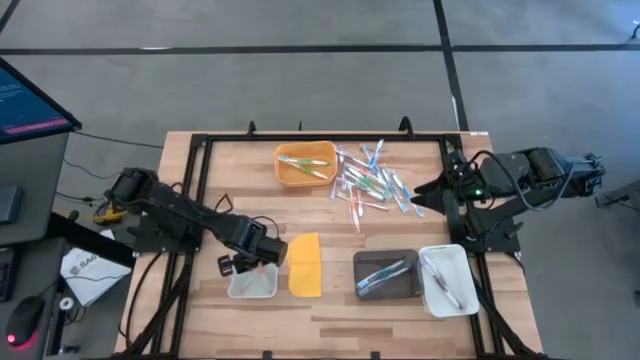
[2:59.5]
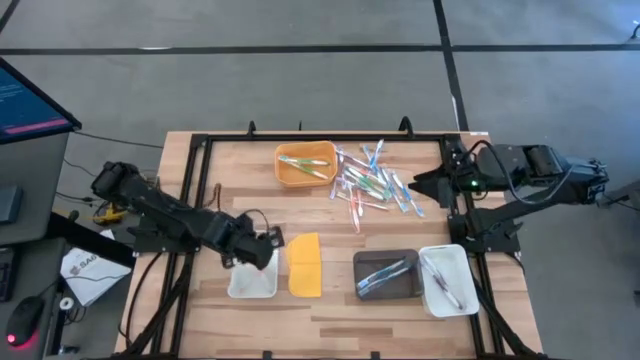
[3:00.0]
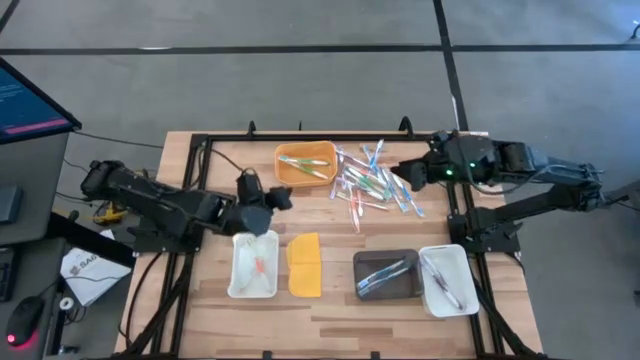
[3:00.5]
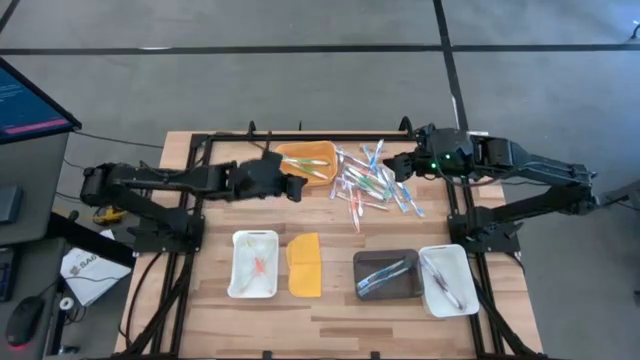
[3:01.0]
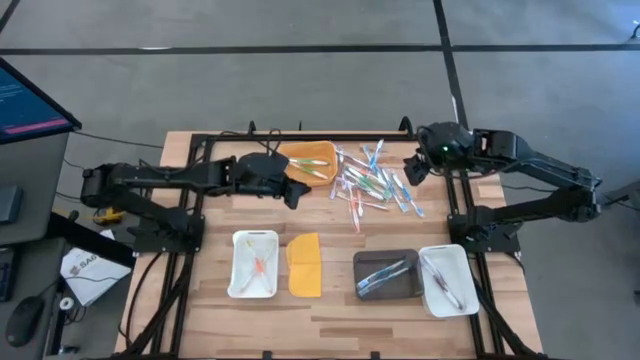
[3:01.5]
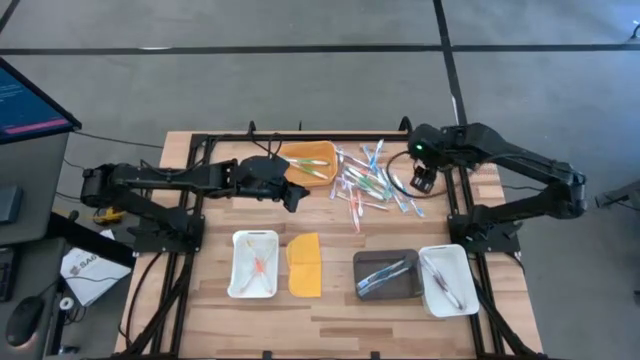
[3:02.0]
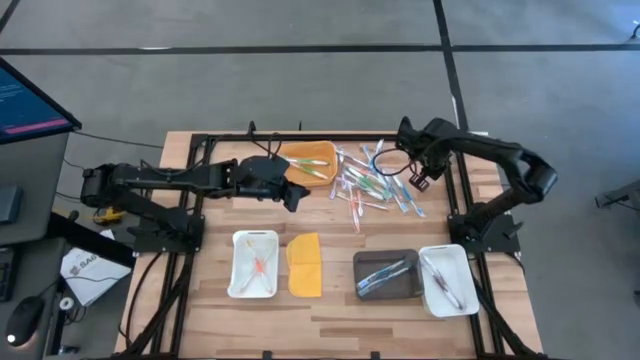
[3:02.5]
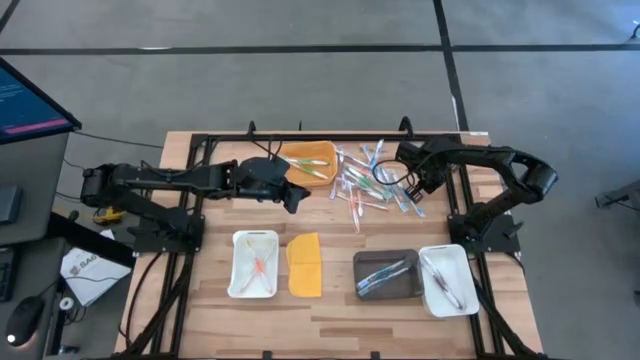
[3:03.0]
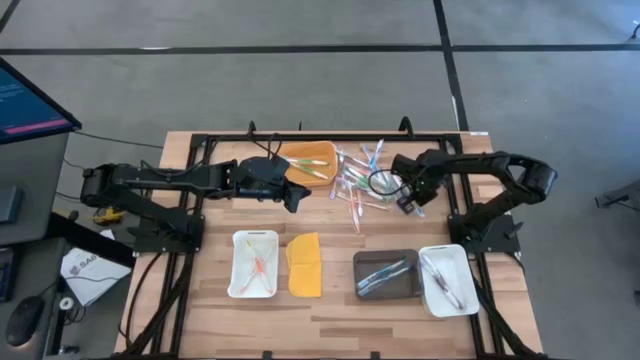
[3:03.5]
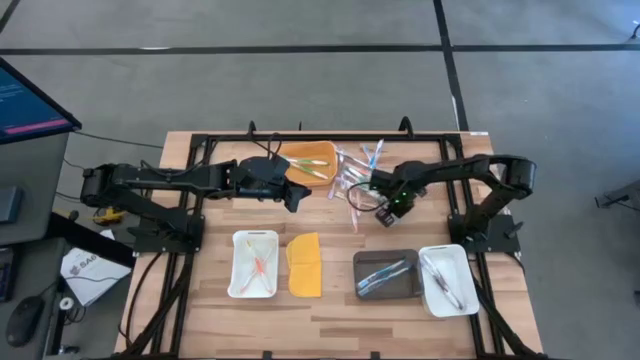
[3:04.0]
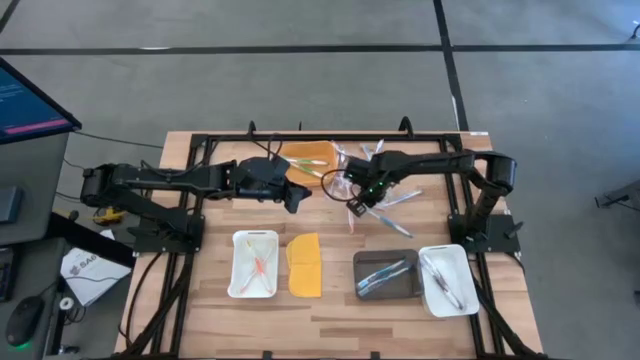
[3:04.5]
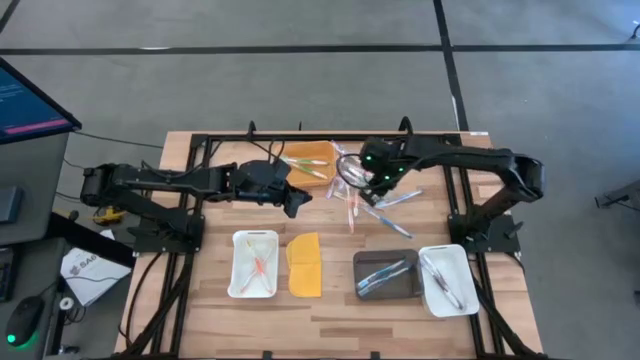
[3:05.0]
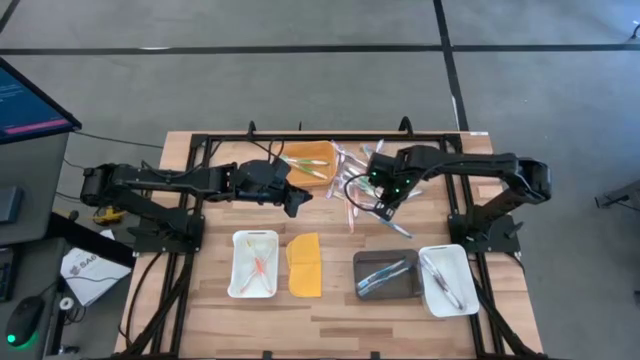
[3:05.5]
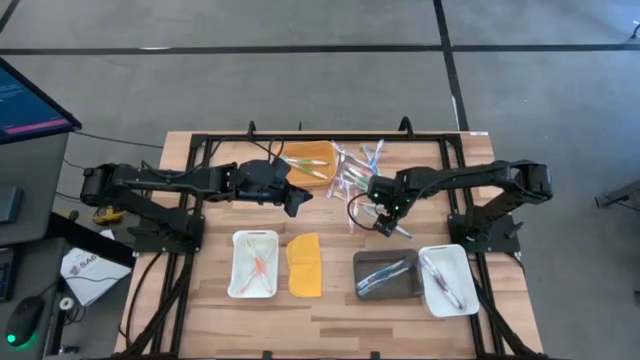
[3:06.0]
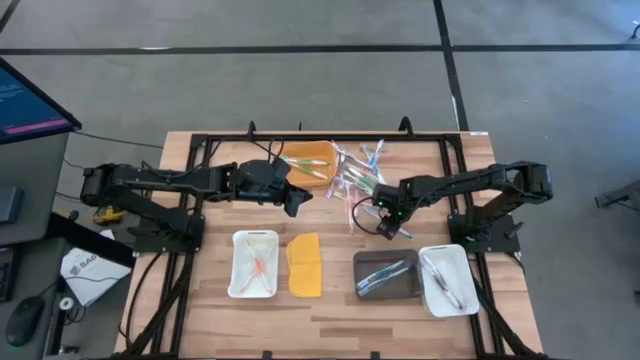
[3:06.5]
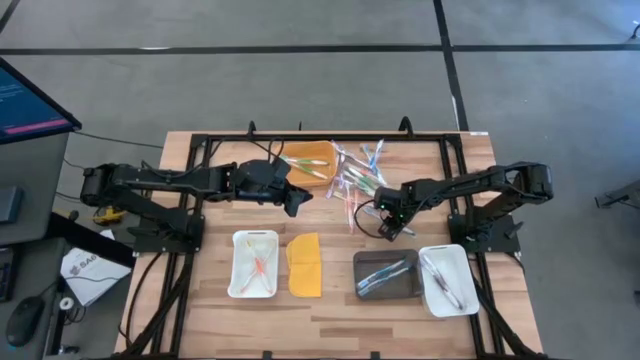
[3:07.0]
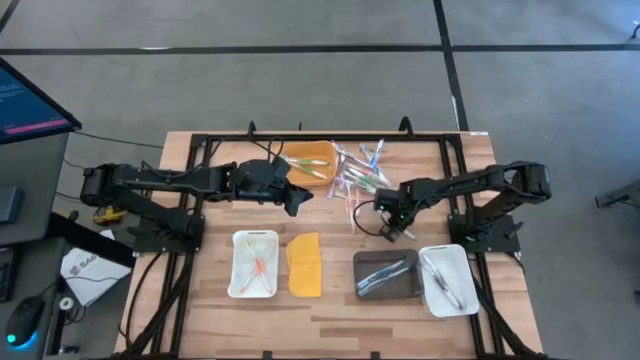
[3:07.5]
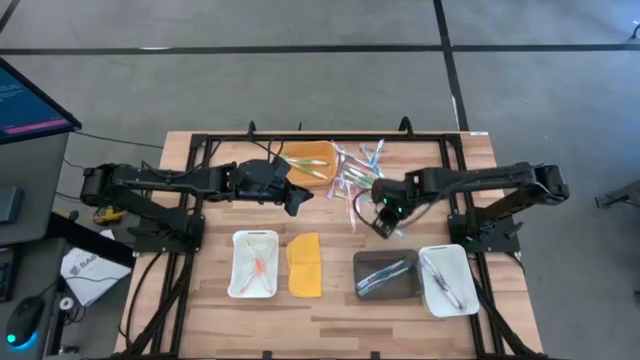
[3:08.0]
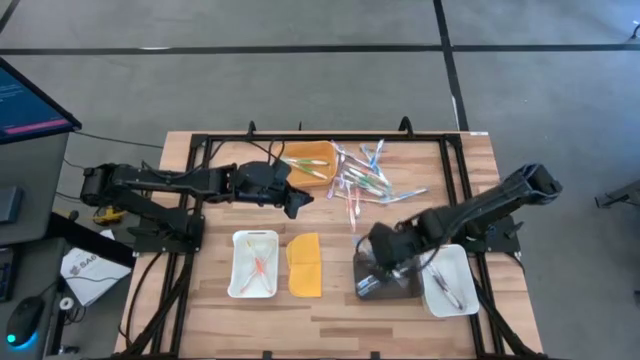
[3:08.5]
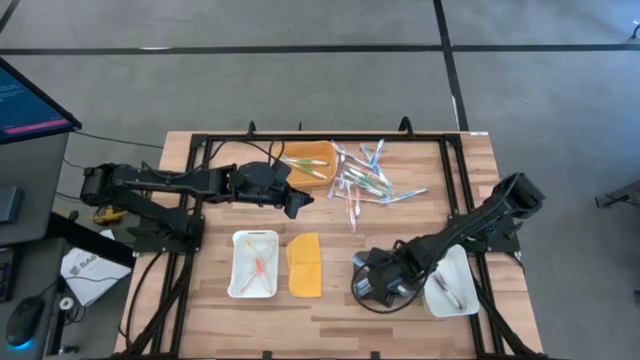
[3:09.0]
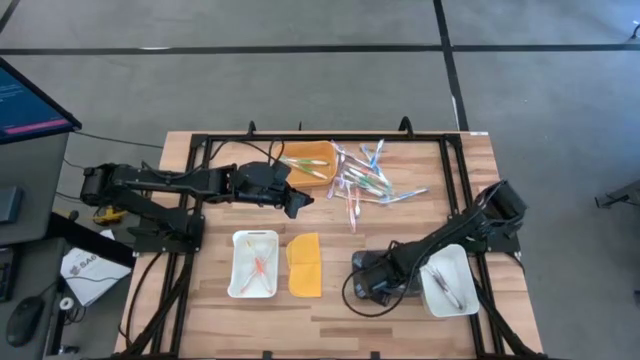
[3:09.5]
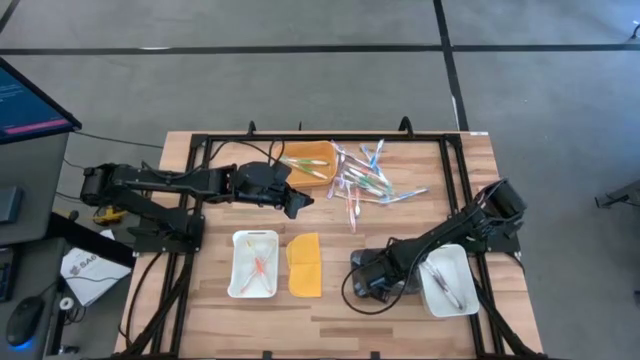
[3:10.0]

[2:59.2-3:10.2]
Task: Pick & Place Toothbrushes
Put the blue toothbrush into the black bin

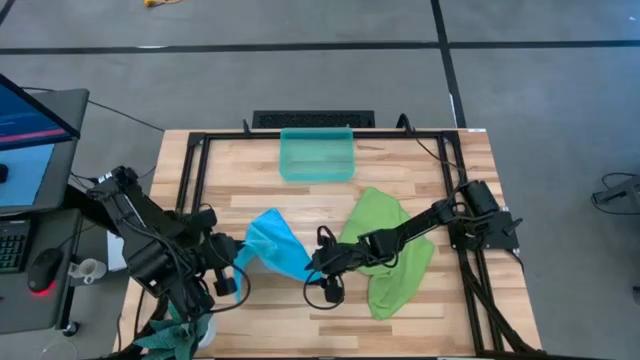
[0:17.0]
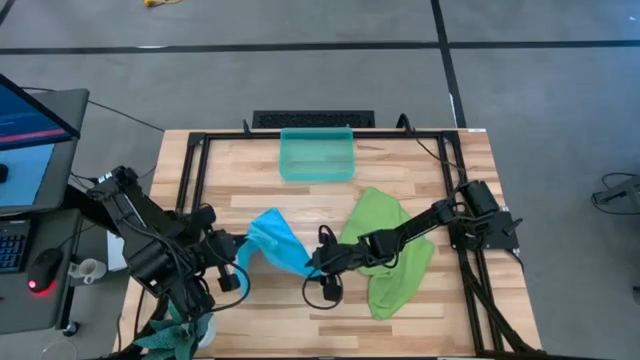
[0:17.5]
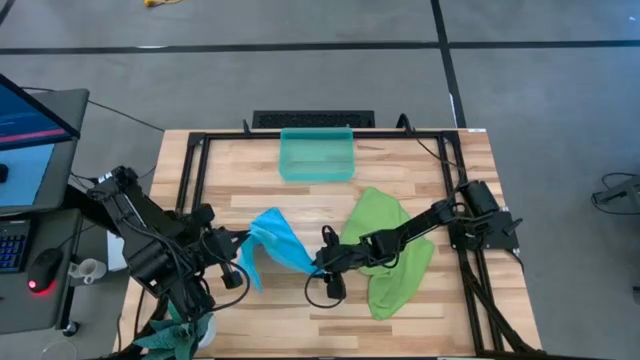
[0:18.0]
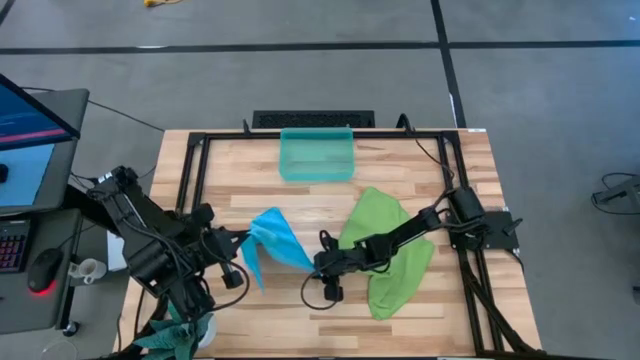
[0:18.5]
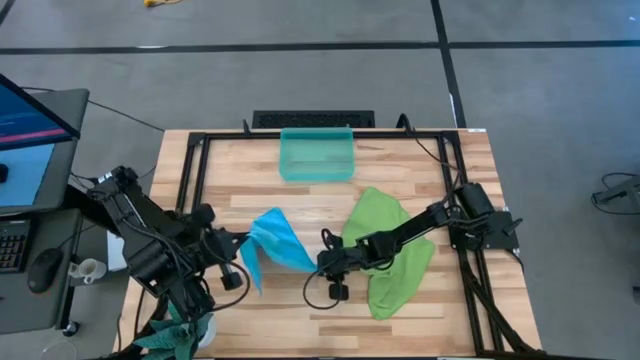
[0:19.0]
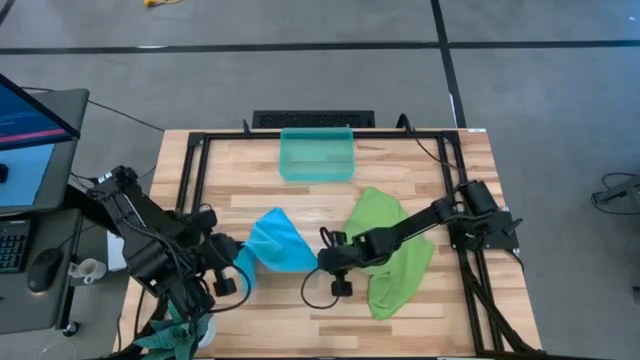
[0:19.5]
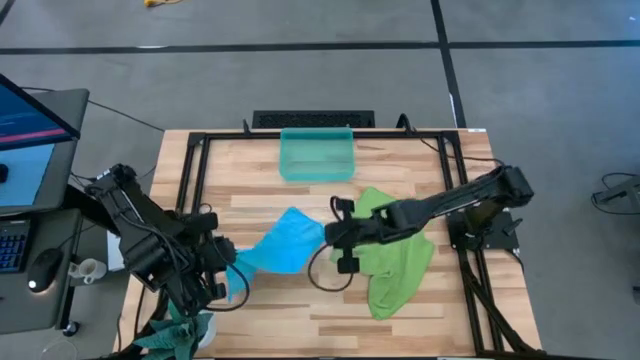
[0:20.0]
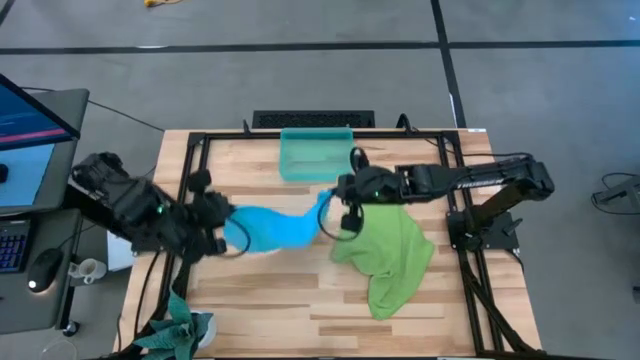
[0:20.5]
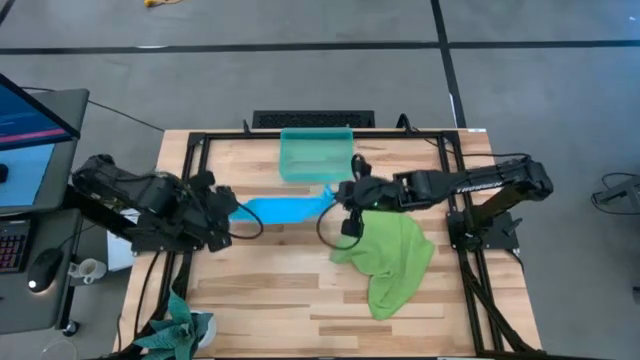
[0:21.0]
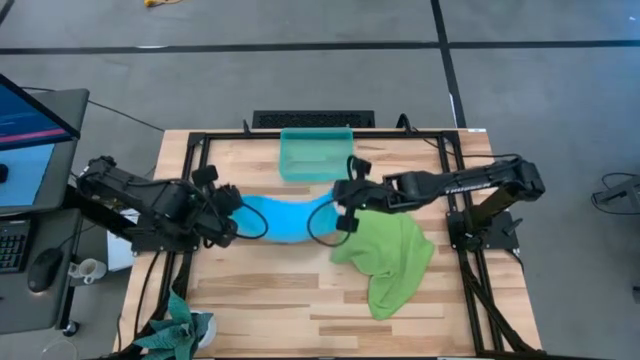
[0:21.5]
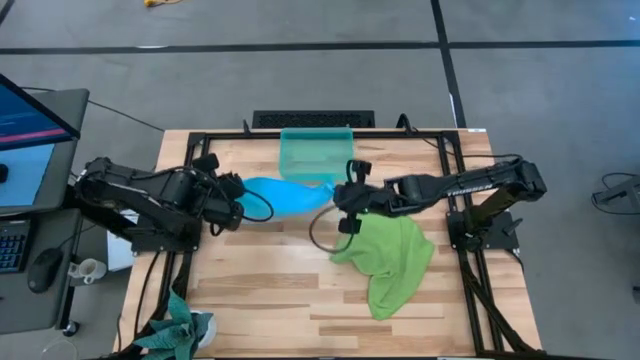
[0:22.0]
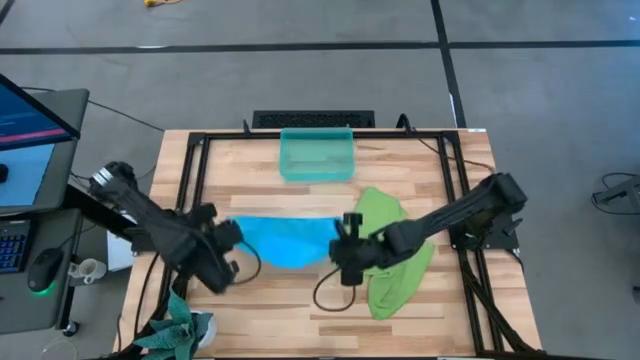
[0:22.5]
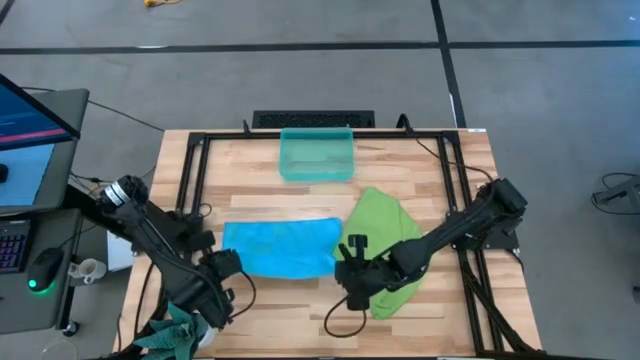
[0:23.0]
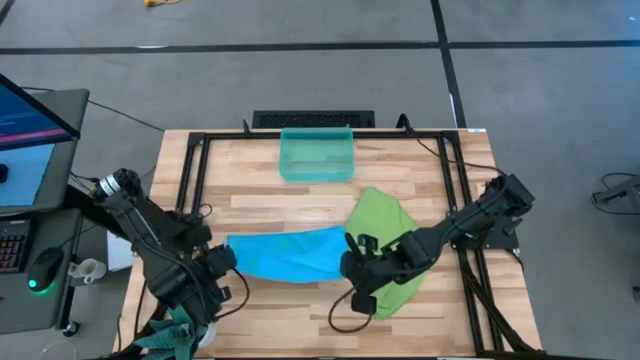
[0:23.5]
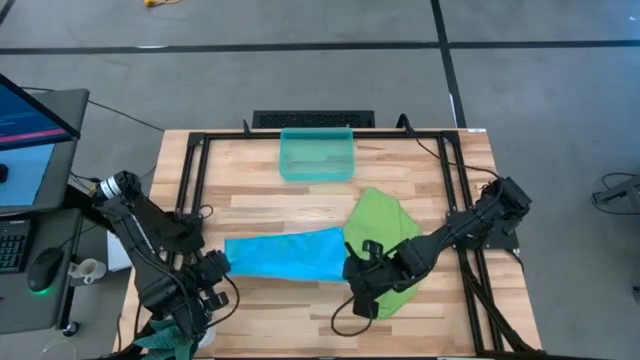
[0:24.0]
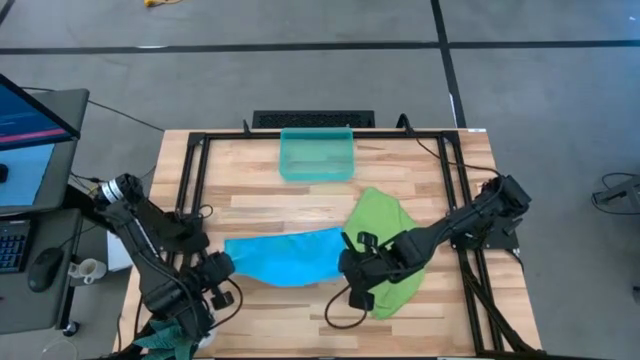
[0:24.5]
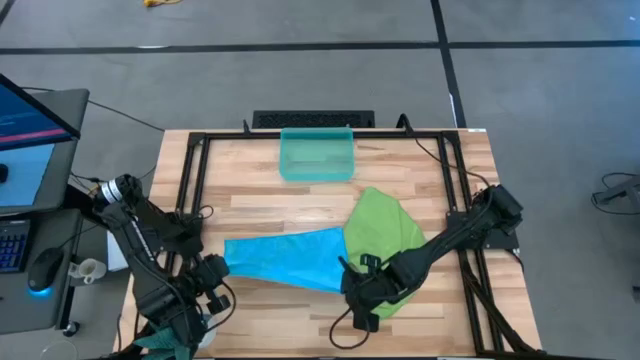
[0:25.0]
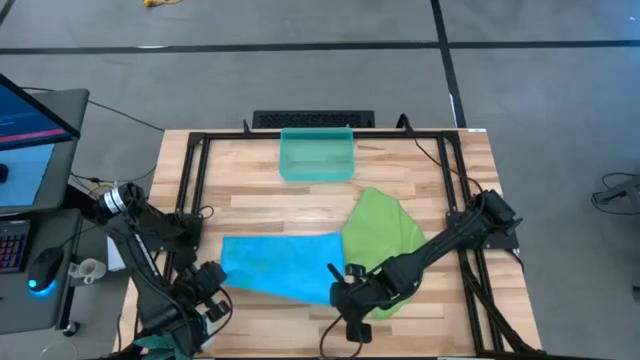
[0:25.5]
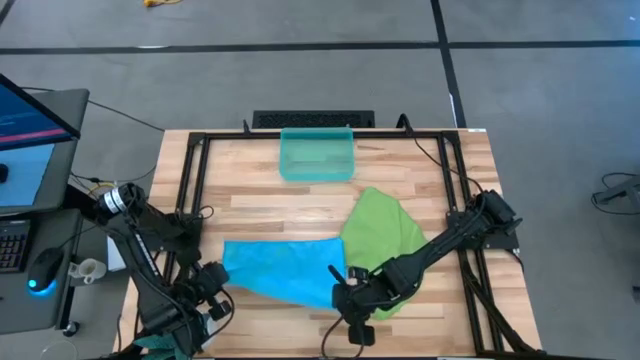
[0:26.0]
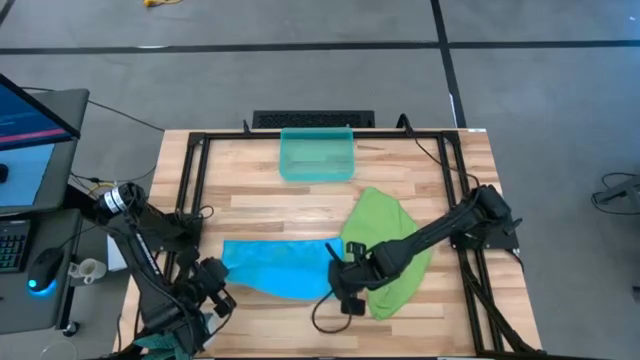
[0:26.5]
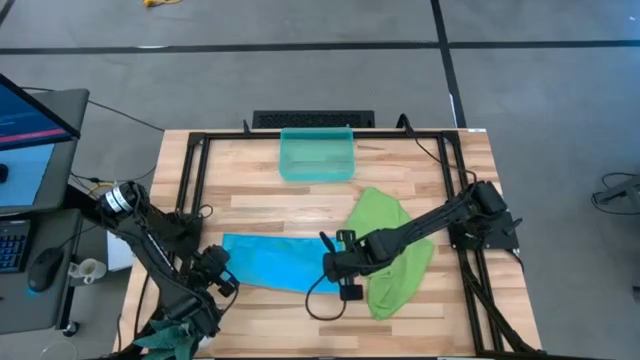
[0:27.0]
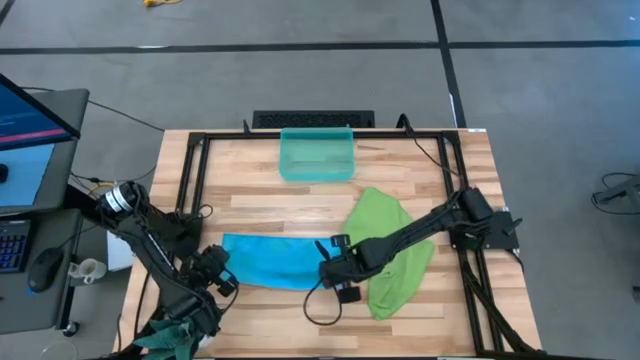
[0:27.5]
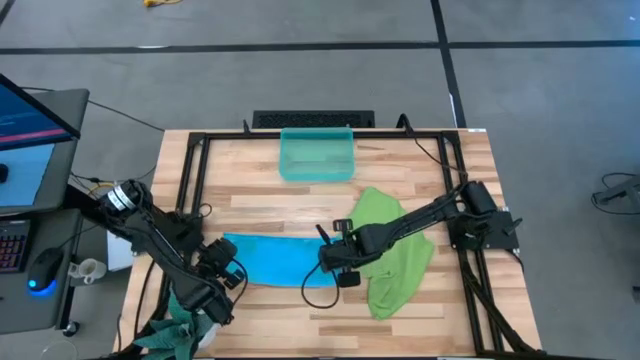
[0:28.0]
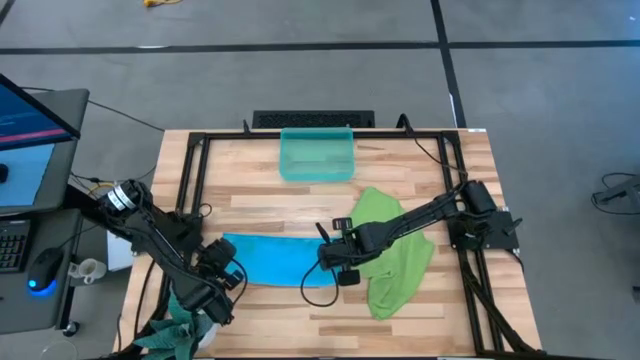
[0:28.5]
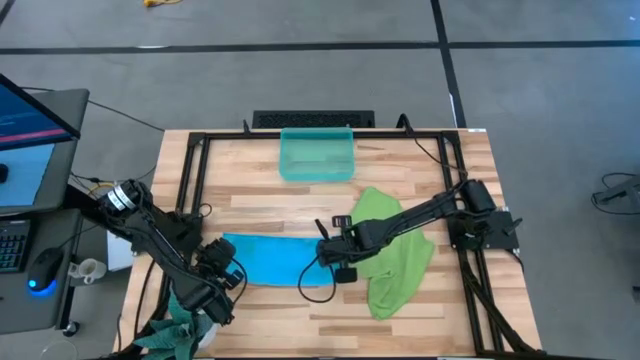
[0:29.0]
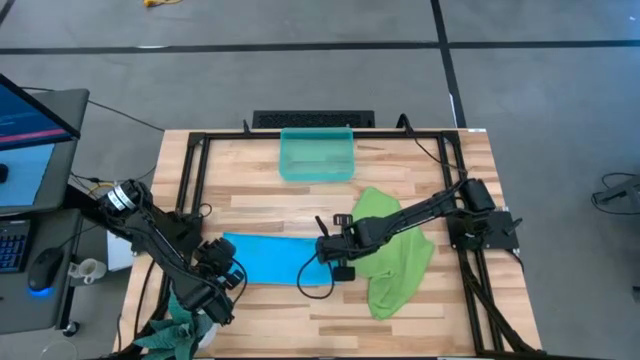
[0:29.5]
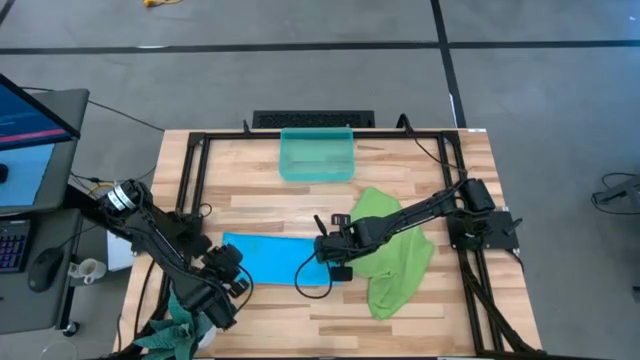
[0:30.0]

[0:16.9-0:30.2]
Task: Roll microfiber towels into tight, uniform cylinder then place into a basket
Fold the blue microfiber cloth
